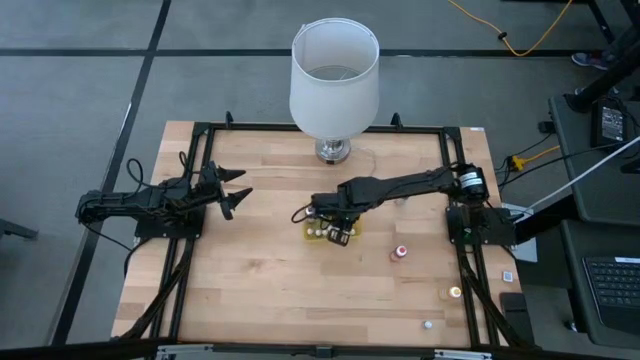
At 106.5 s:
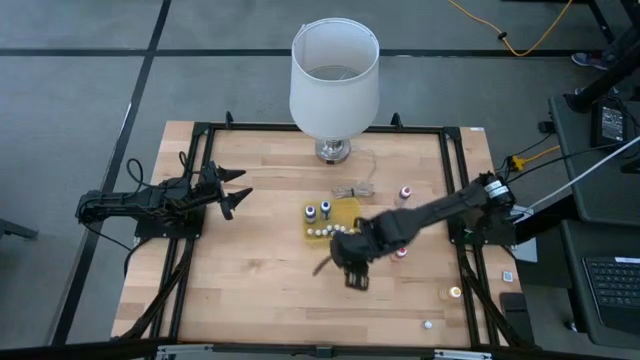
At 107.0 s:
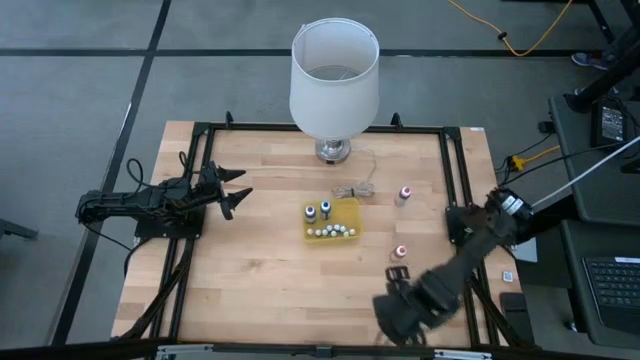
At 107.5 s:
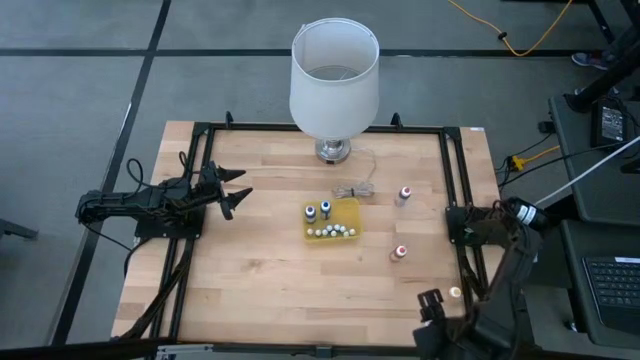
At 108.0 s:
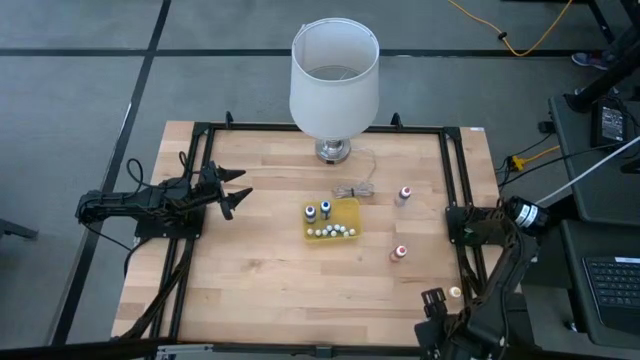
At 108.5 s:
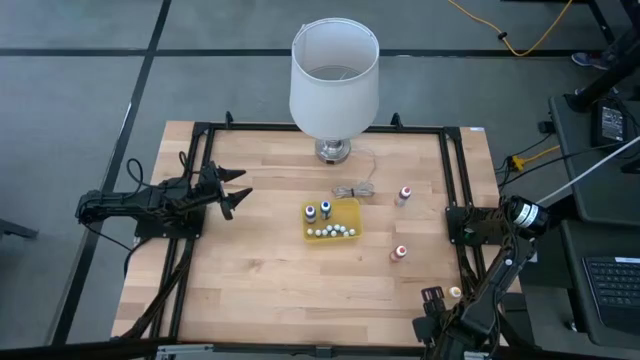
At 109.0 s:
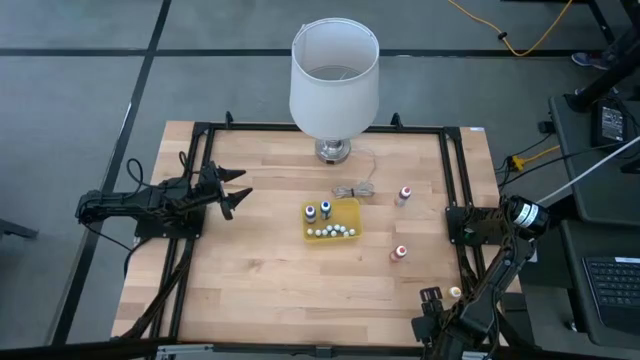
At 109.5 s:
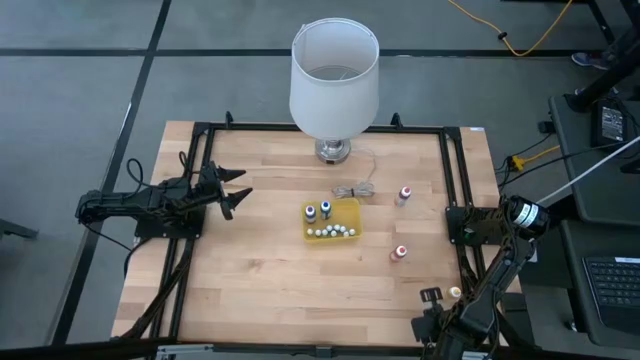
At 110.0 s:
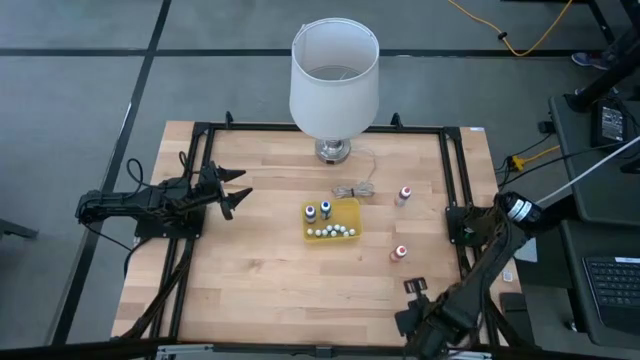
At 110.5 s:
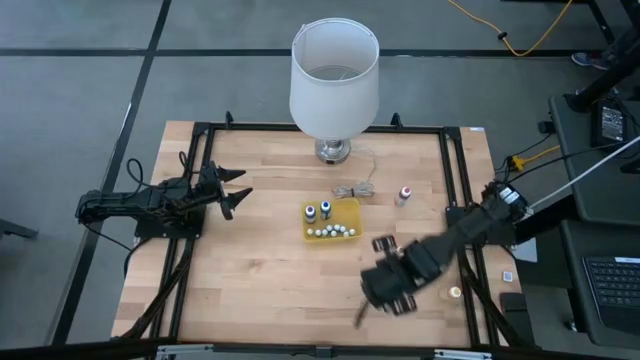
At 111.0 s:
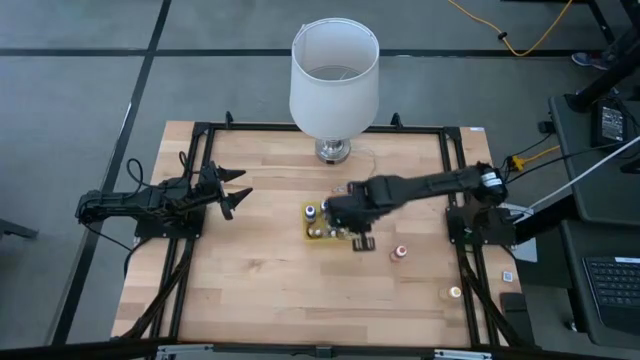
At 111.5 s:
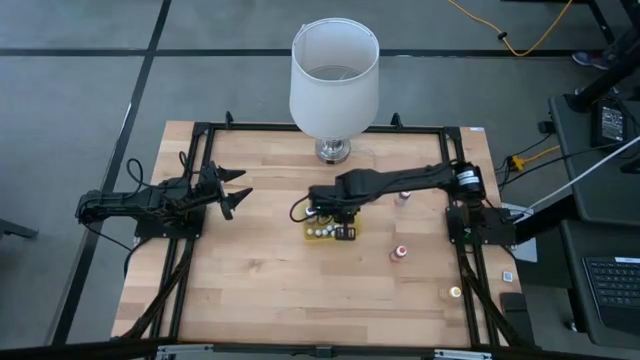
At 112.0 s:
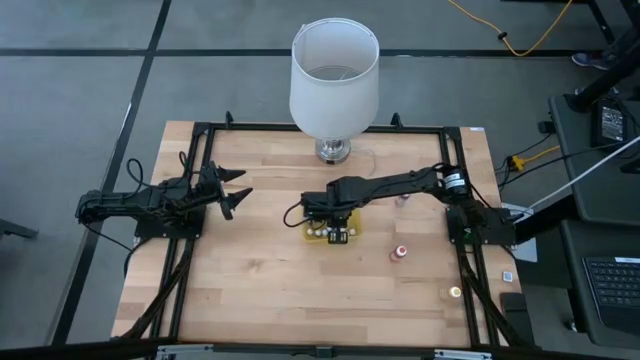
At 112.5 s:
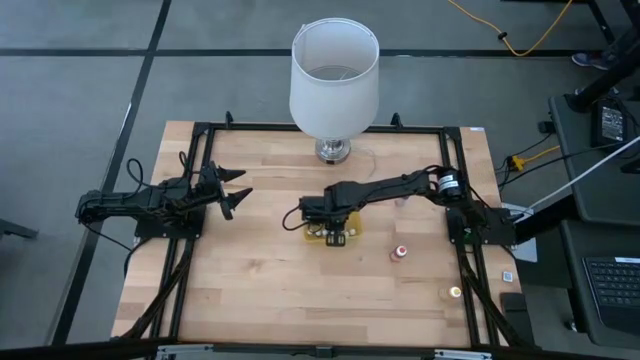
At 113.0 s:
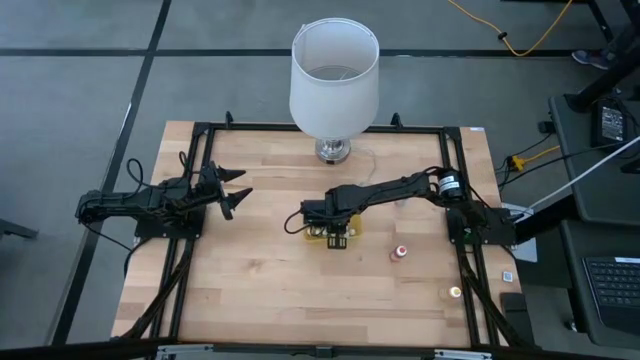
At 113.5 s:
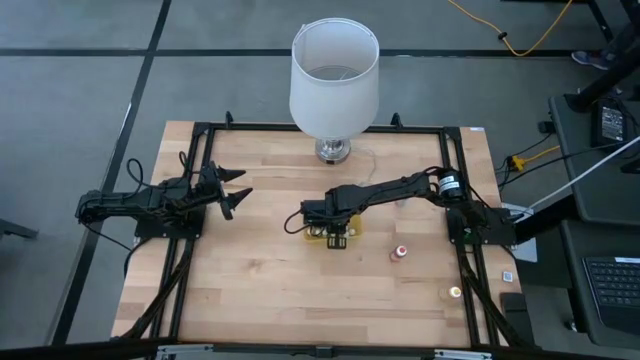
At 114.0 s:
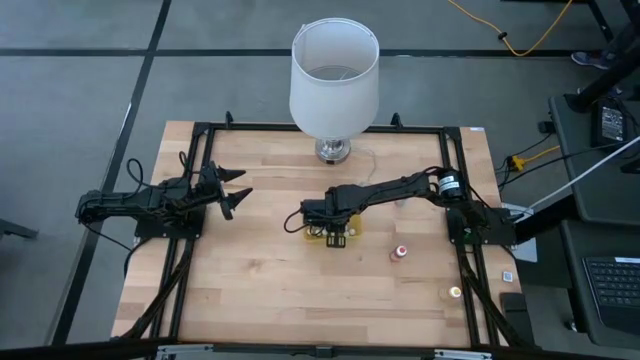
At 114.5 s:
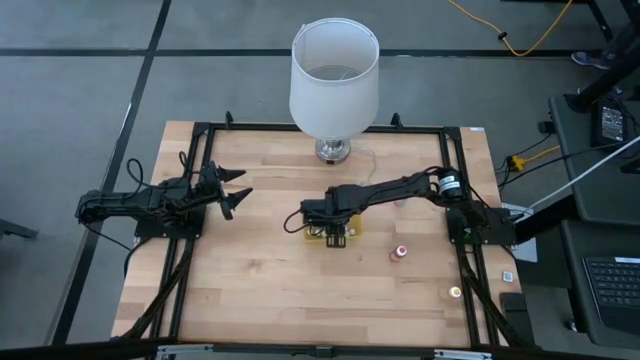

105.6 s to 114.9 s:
Task: Pick & Place food coloring
Put the small red food coloring bottle into the yellow bin

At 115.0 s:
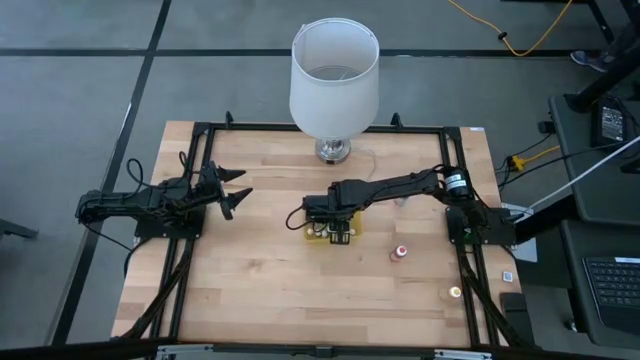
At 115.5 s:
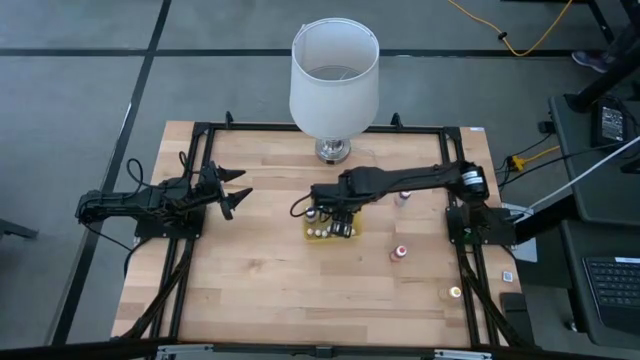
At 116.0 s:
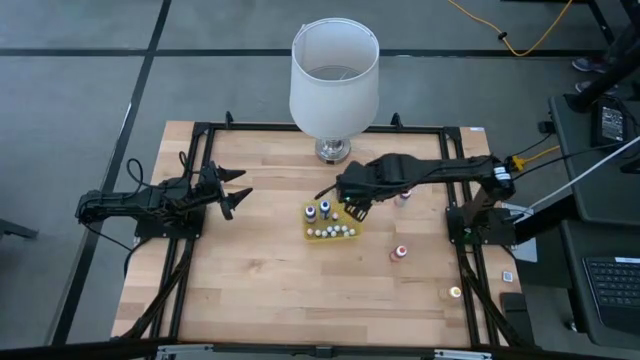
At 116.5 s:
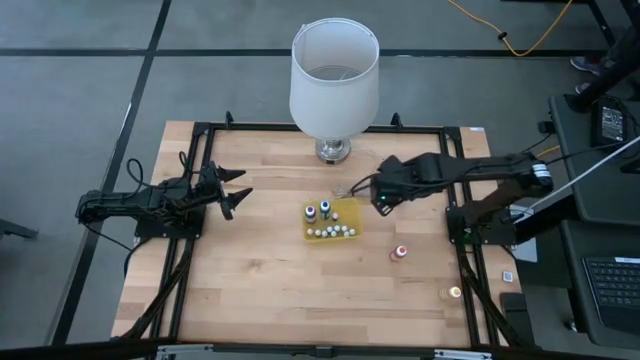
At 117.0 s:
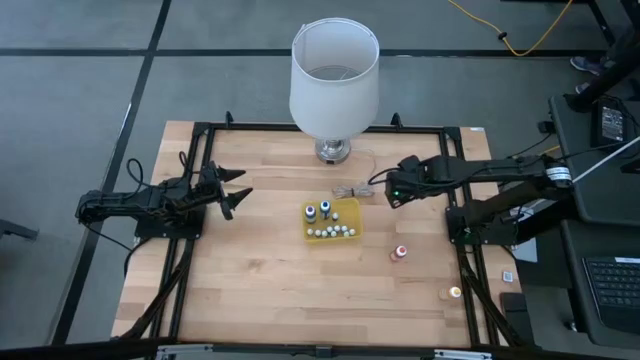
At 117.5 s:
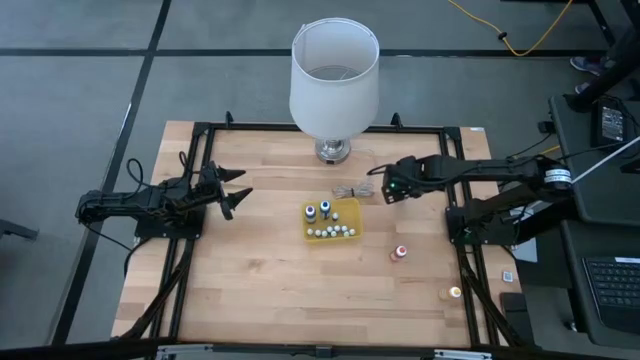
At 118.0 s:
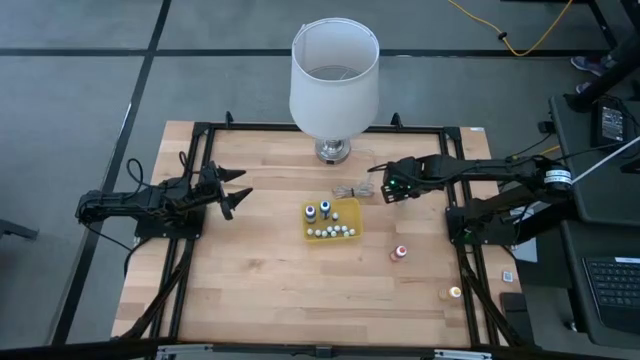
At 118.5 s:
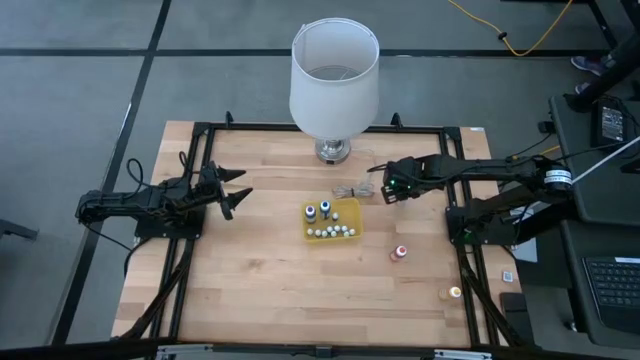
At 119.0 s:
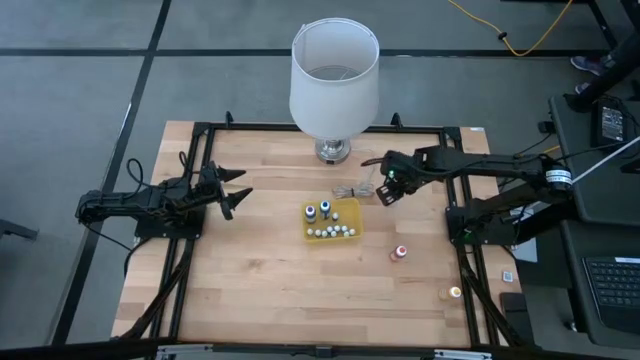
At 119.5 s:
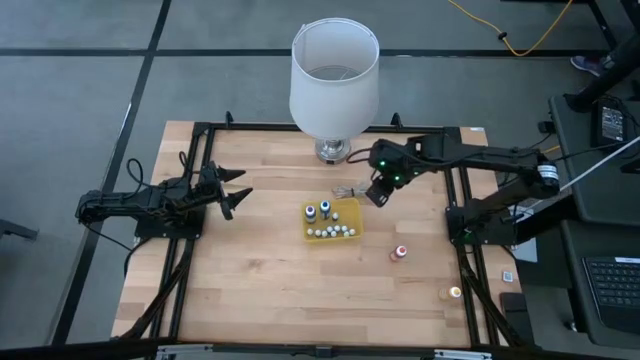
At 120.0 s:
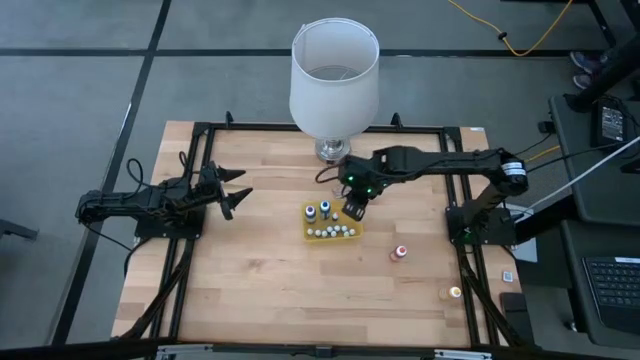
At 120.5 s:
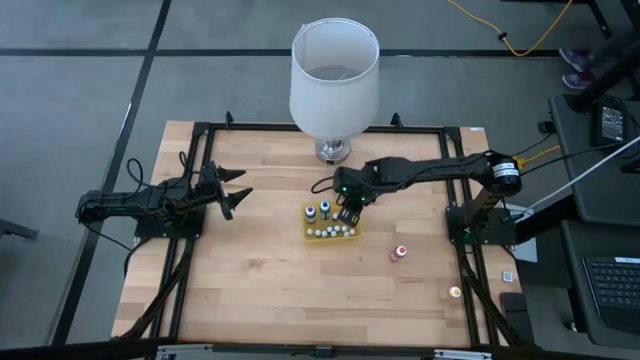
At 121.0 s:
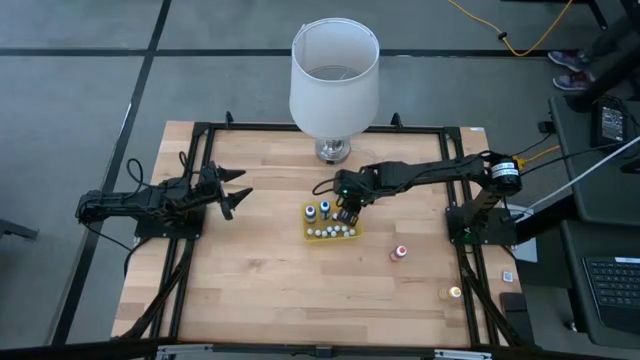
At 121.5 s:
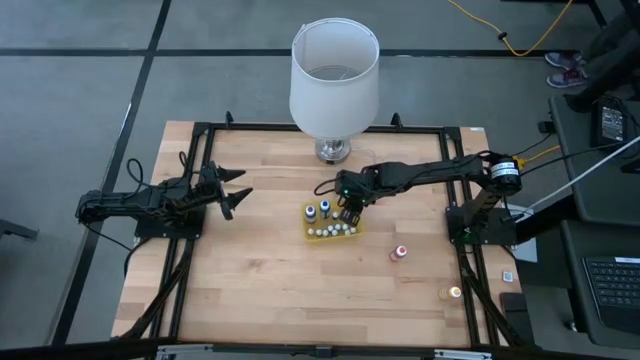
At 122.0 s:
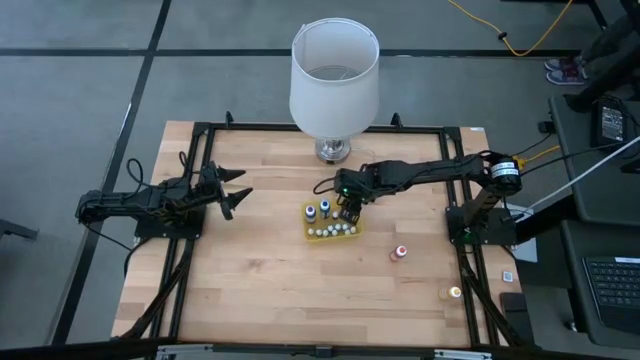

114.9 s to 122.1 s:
Put the large pink food coloring bottle into the yellow bin

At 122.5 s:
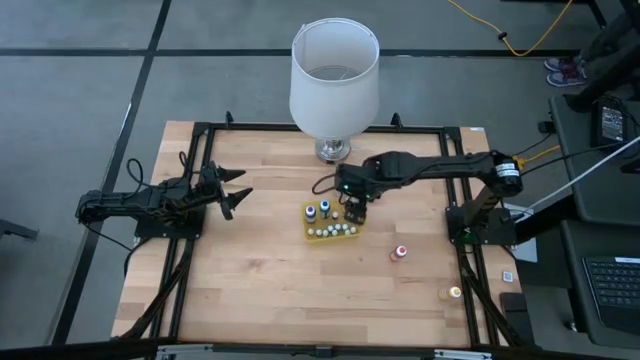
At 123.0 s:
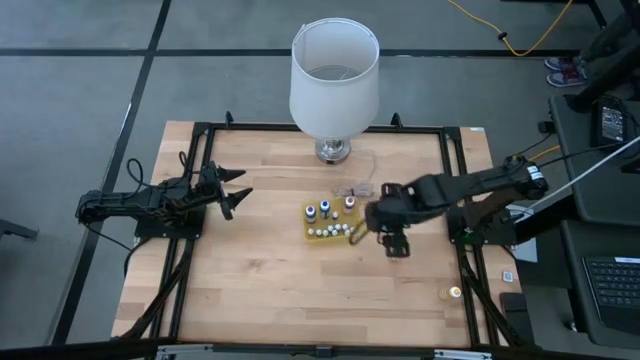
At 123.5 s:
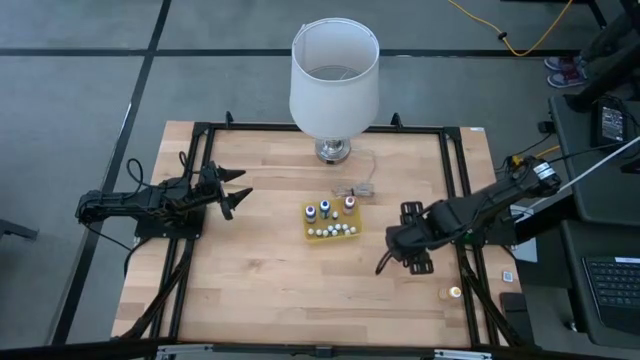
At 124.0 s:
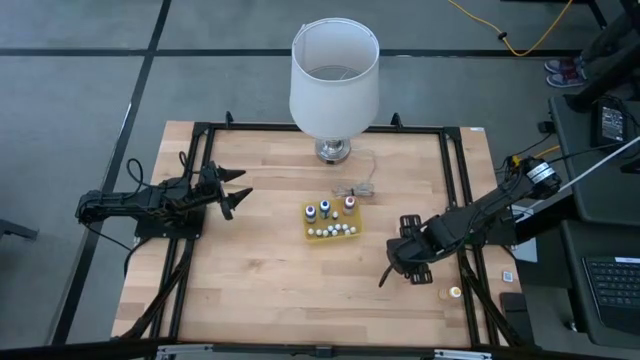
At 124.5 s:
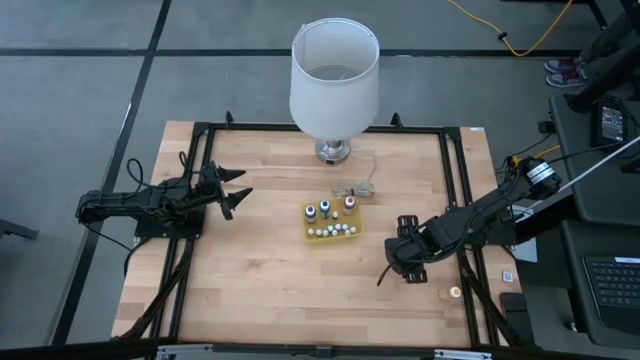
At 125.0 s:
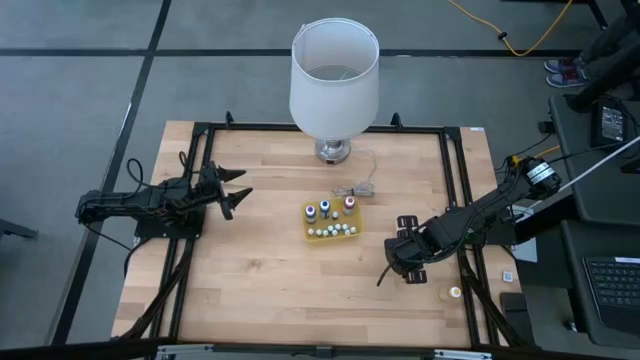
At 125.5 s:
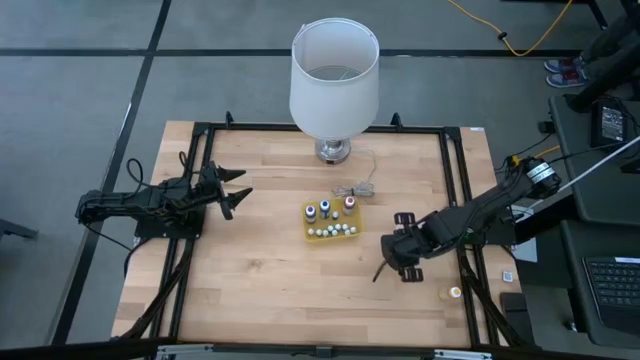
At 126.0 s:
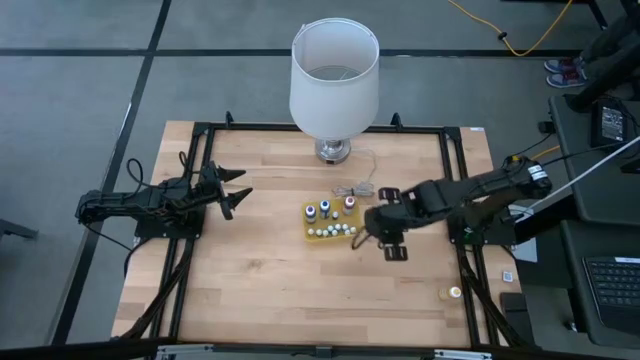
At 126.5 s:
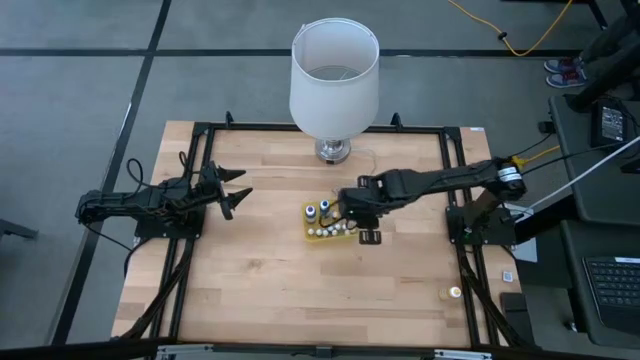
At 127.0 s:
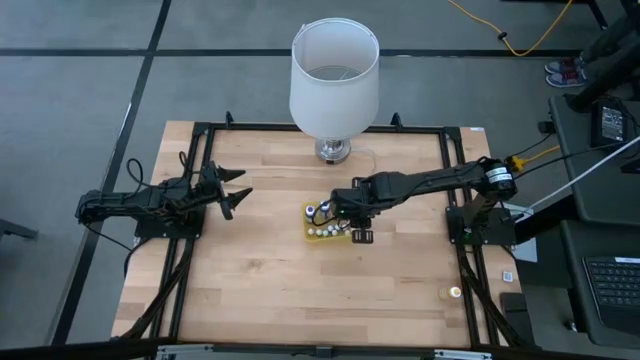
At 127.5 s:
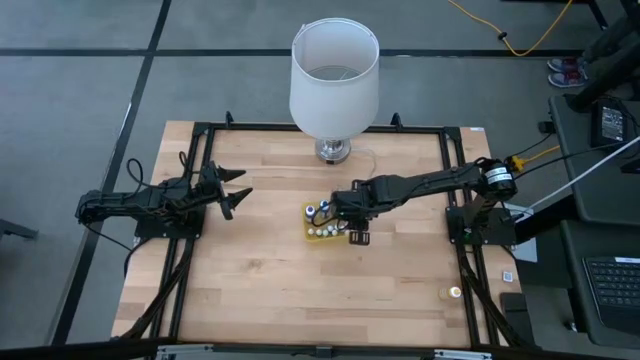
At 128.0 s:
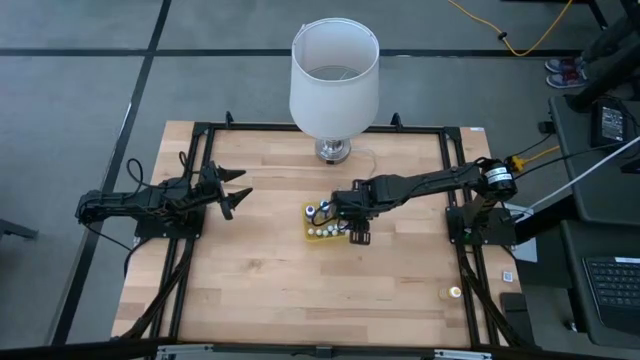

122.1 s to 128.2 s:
Put the large orange food coloring bottle into the yellow bin
